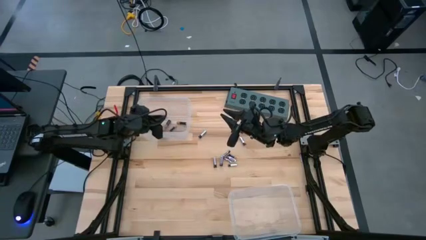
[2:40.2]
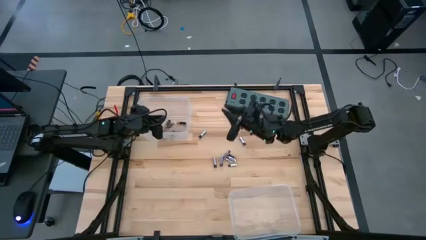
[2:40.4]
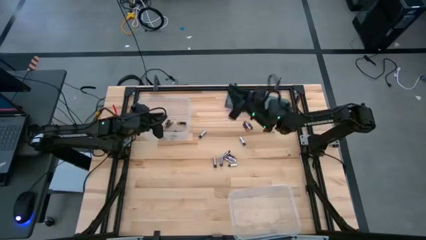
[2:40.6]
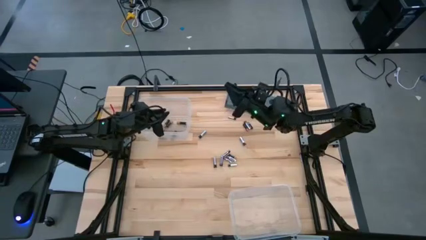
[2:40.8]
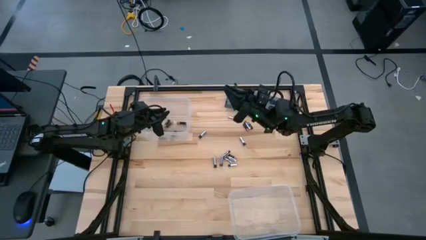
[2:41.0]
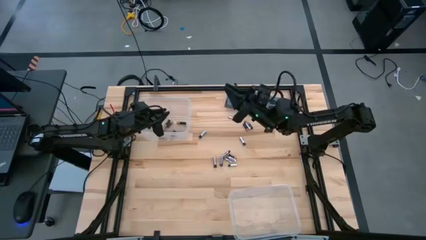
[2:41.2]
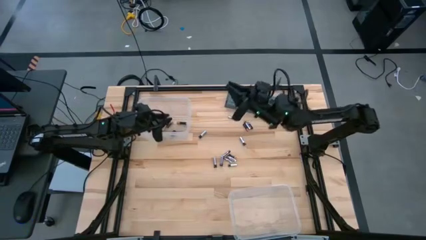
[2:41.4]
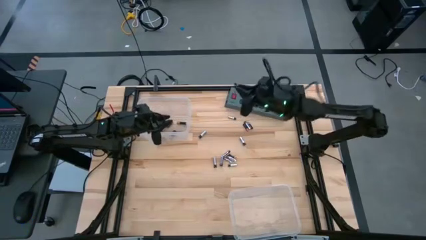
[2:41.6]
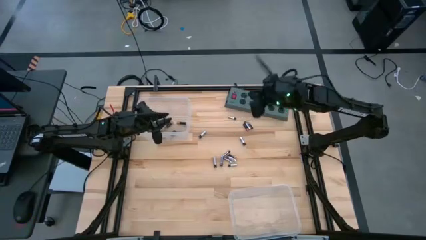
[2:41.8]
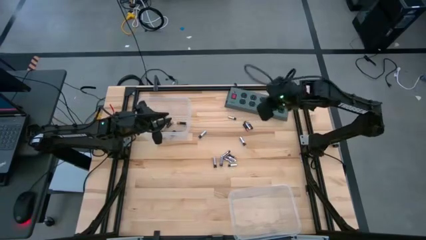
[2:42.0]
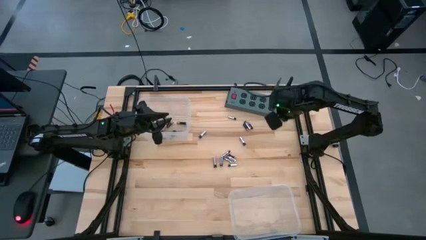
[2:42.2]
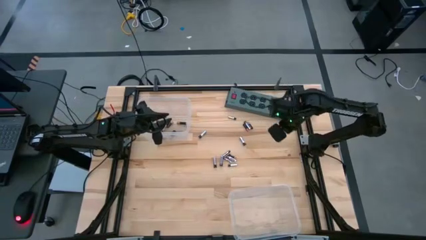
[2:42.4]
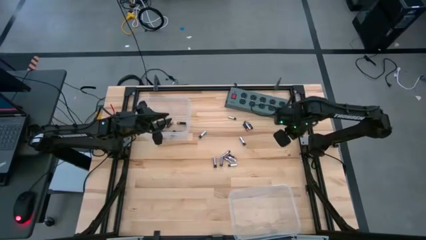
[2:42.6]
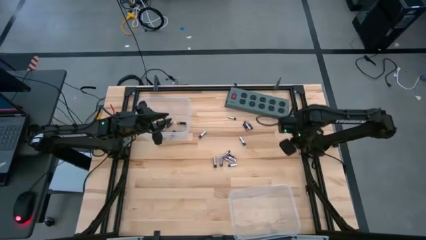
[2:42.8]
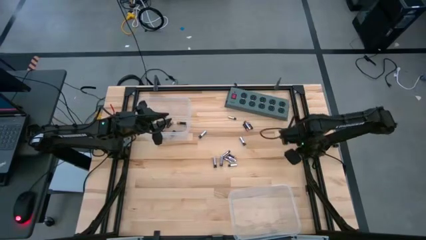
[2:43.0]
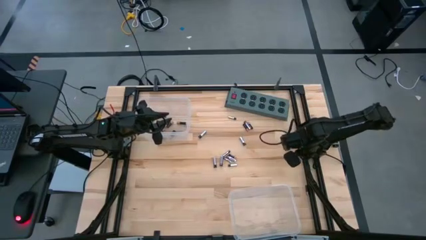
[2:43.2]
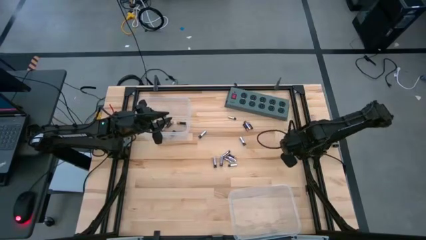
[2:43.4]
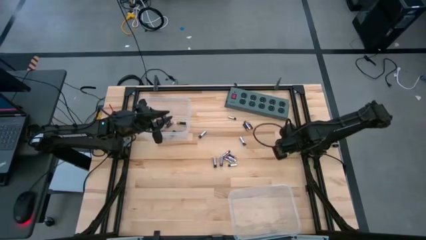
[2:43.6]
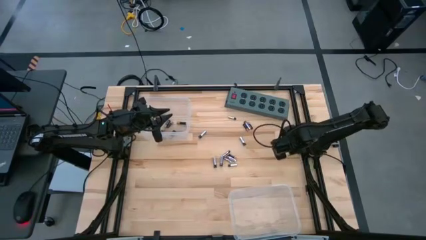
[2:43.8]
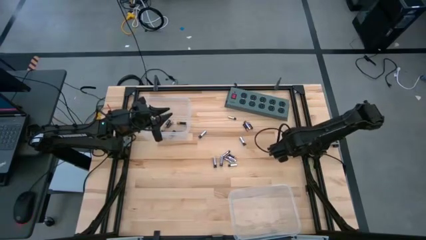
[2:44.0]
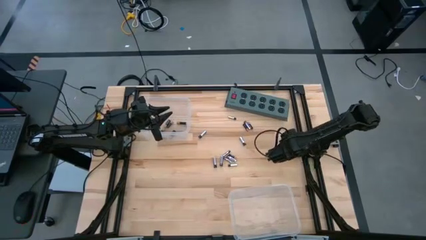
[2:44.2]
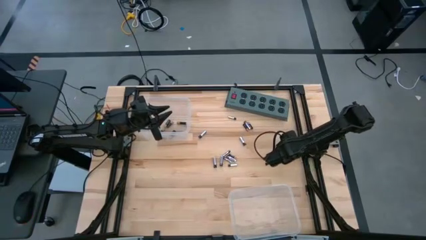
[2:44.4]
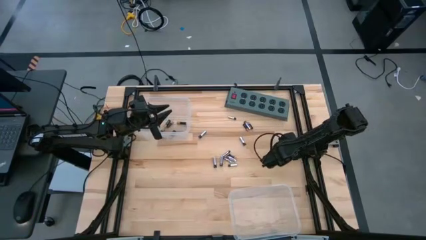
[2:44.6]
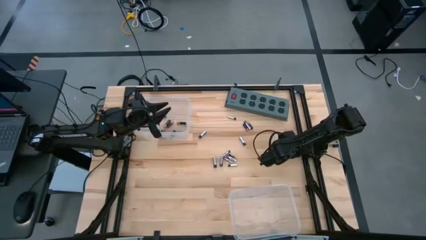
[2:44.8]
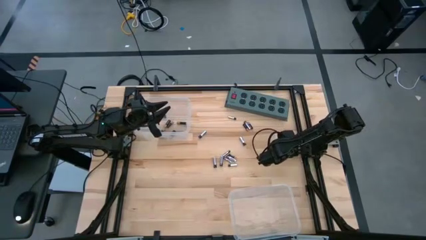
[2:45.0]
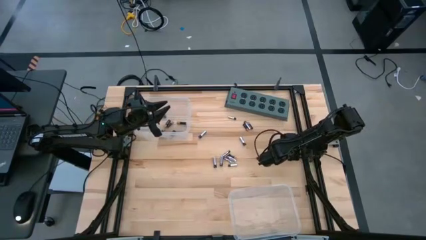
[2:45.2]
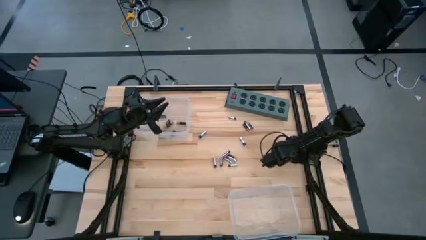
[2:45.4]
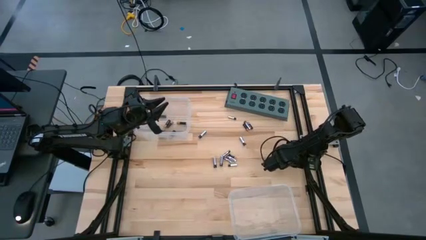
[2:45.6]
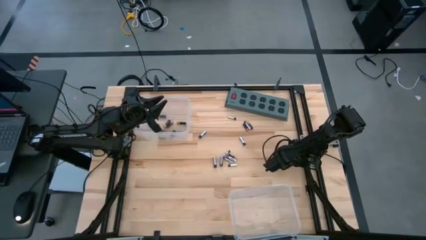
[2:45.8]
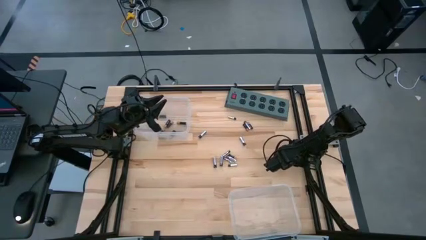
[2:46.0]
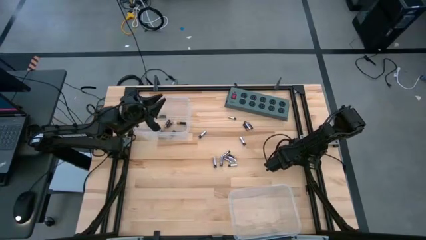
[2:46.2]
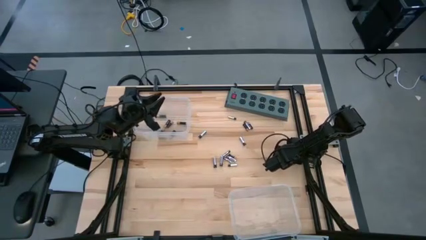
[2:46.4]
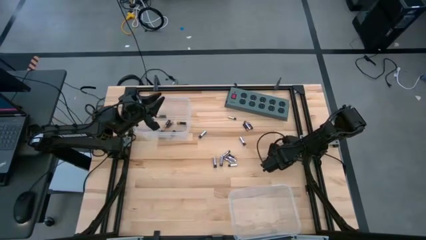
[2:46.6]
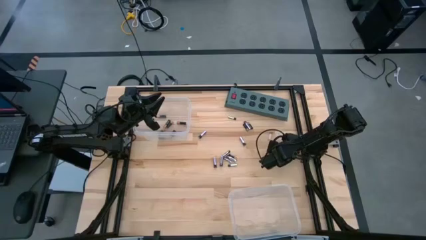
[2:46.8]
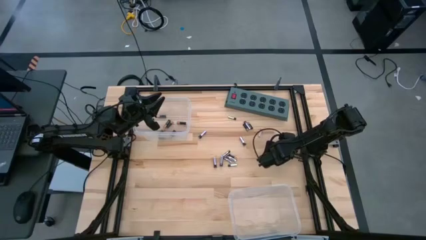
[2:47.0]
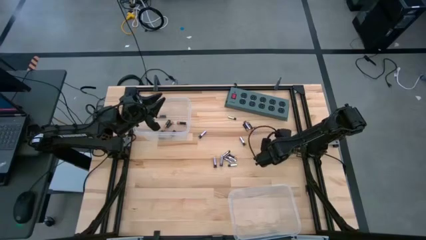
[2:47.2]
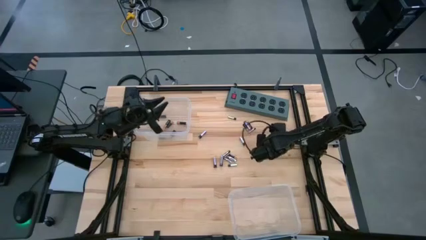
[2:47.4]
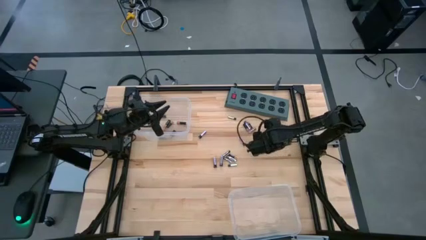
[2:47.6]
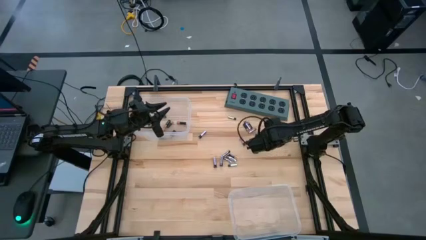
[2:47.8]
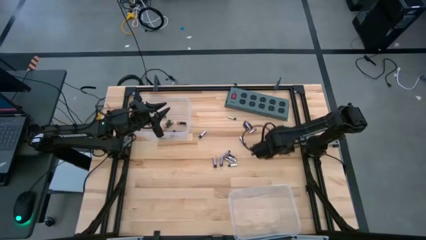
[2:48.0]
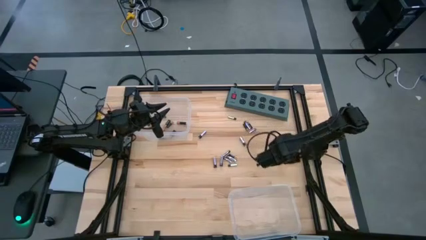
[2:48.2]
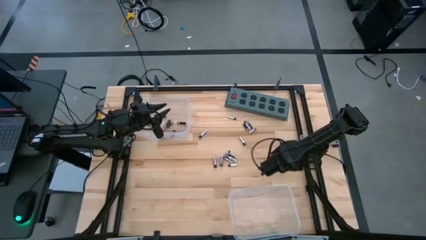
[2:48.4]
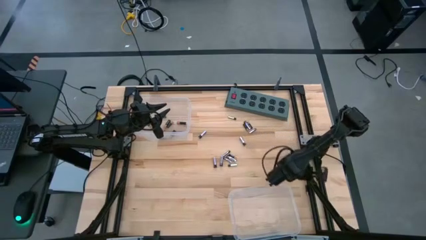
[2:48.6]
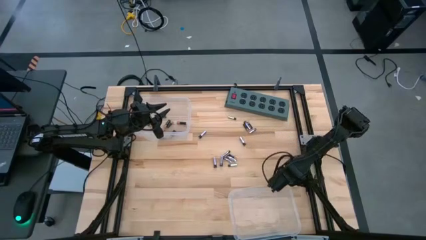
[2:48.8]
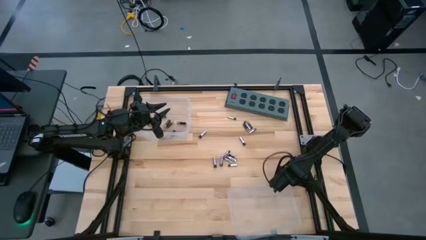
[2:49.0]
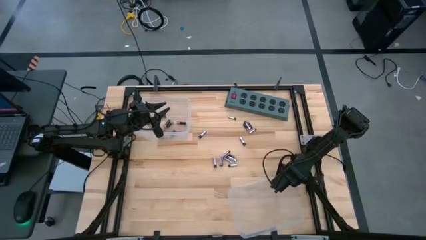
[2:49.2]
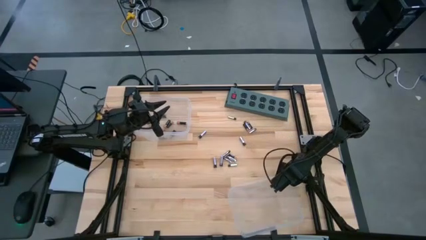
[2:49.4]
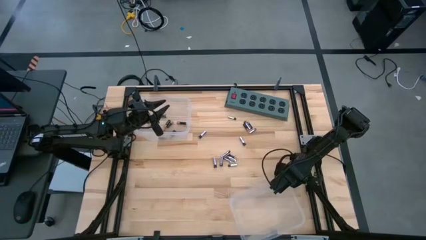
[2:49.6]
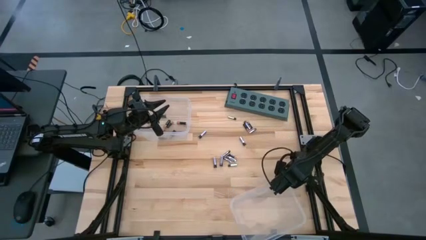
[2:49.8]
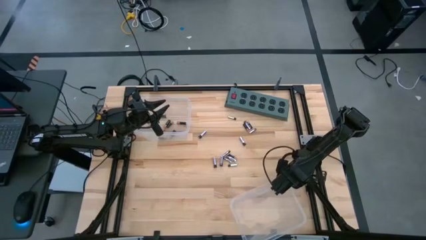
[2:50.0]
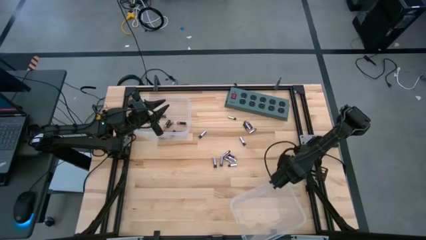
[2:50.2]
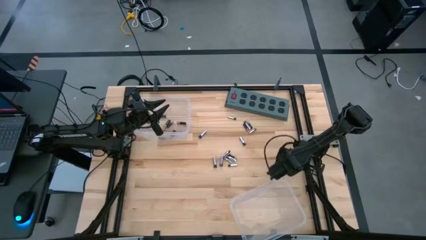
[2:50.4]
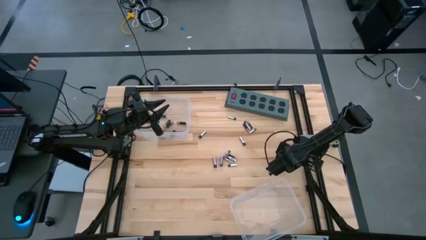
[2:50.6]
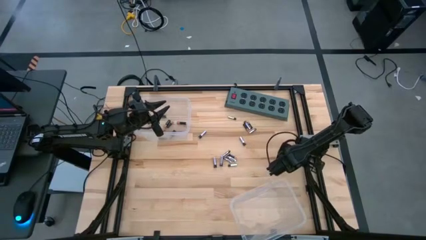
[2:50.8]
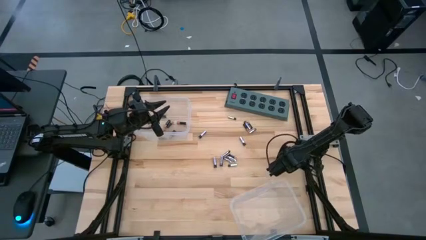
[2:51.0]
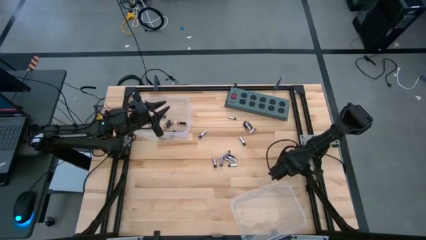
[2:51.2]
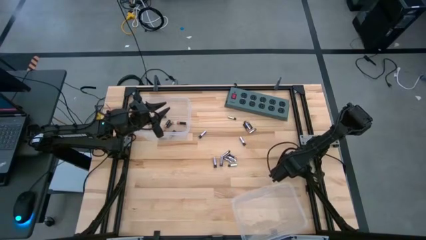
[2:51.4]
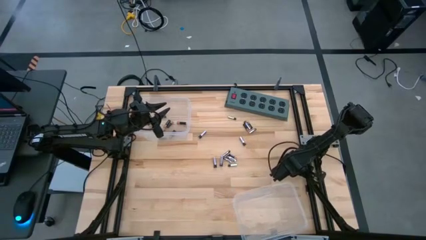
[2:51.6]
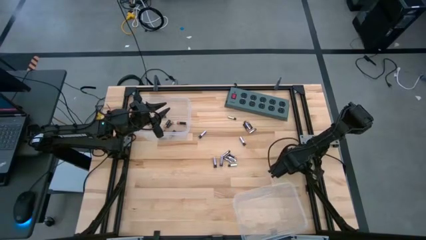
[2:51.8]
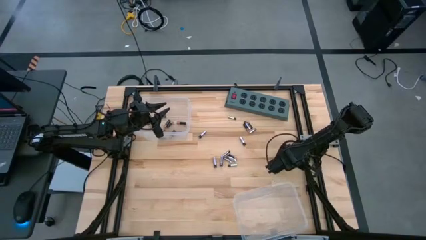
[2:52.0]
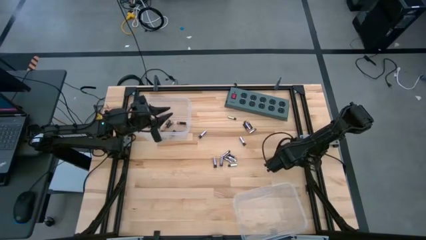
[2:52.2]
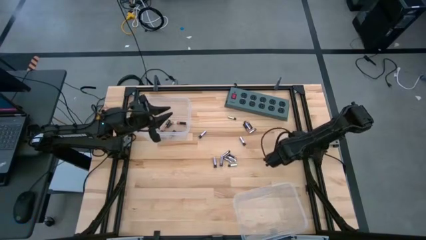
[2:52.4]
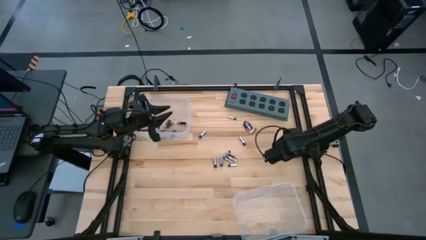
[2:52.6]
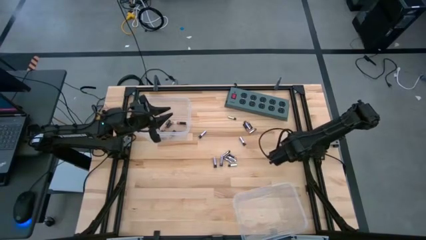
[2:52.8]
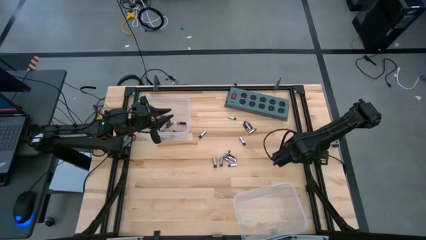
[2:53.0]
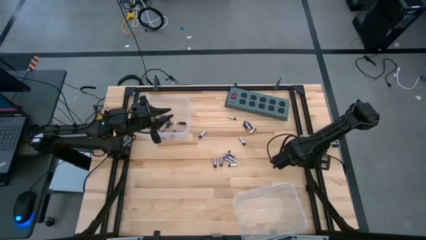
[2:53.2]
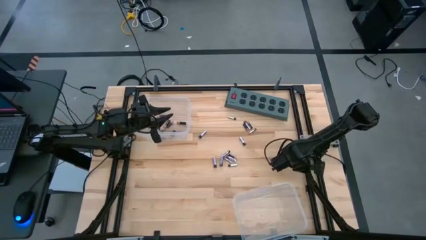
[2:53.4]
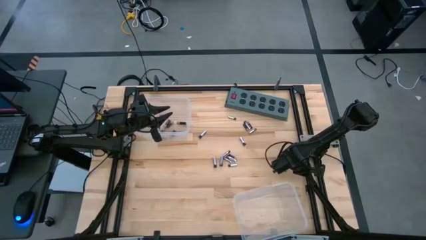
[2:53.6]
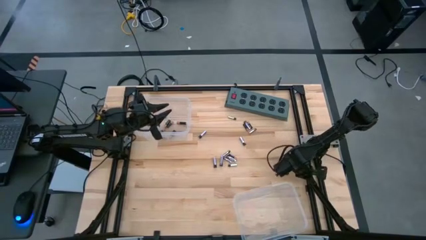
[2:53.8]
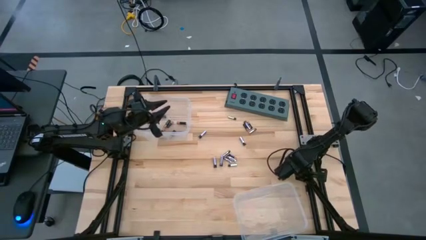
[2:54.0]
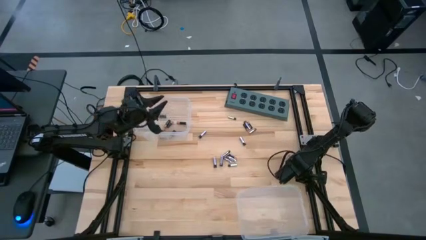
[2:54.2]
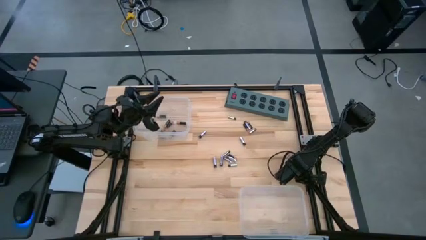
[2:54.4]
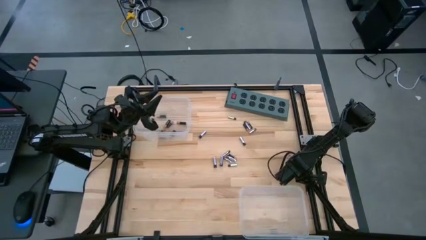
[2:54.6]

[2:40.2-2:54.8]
Task: Sort batteries
Put the black battery into the top transparent bin
